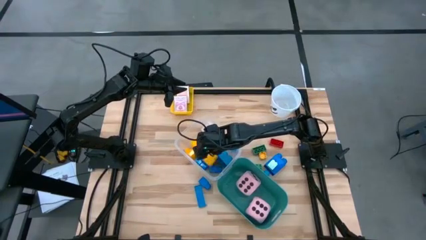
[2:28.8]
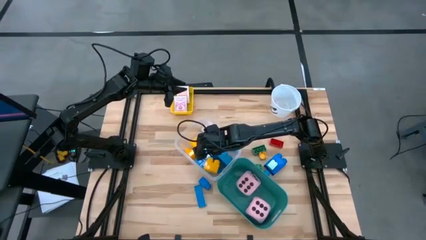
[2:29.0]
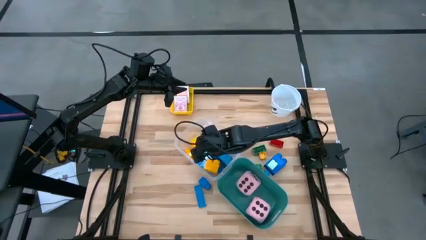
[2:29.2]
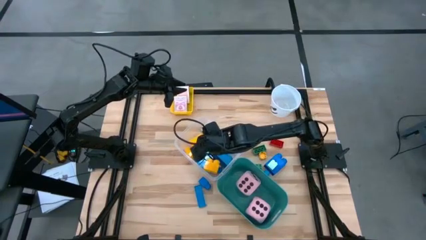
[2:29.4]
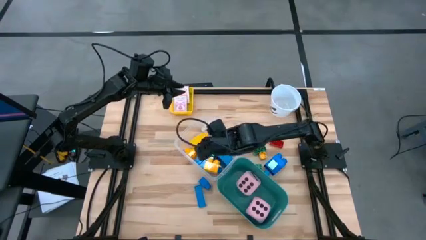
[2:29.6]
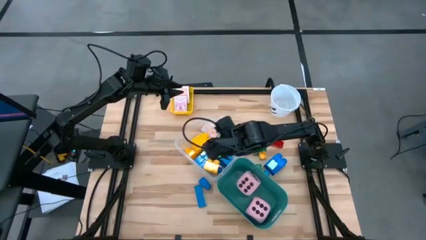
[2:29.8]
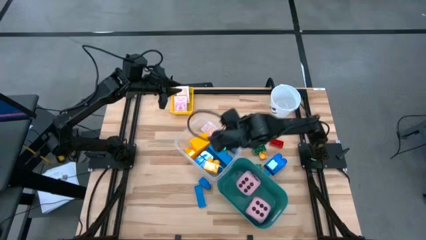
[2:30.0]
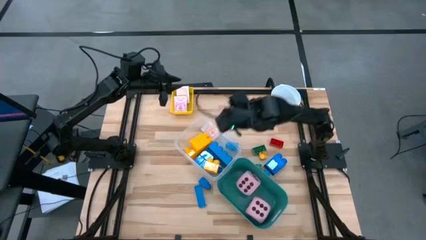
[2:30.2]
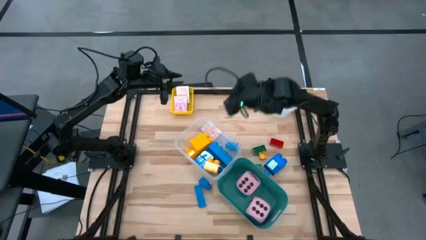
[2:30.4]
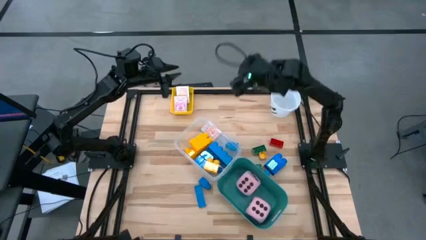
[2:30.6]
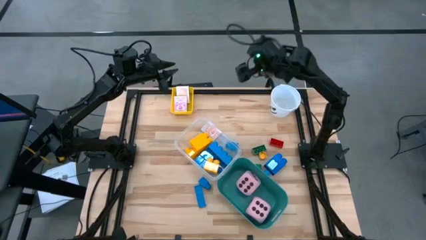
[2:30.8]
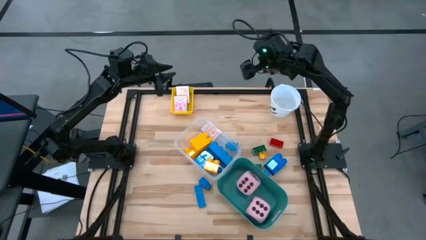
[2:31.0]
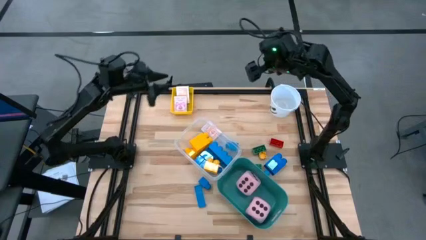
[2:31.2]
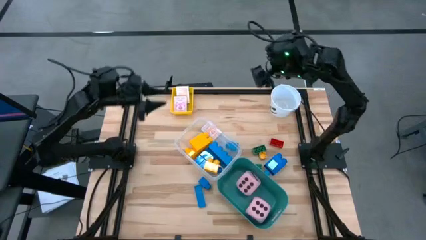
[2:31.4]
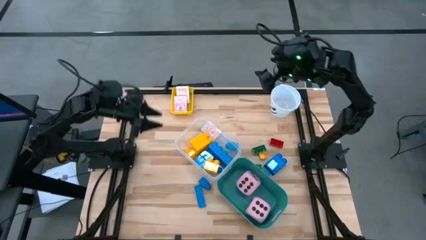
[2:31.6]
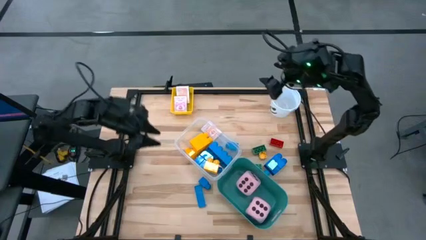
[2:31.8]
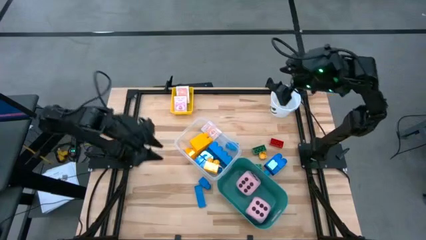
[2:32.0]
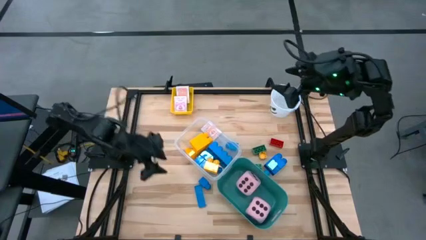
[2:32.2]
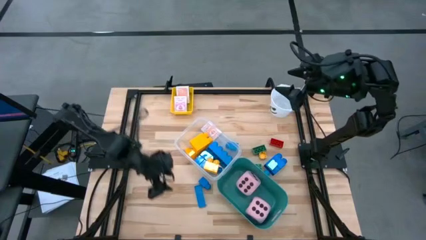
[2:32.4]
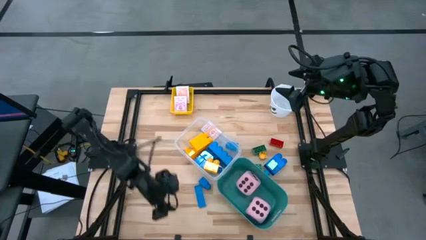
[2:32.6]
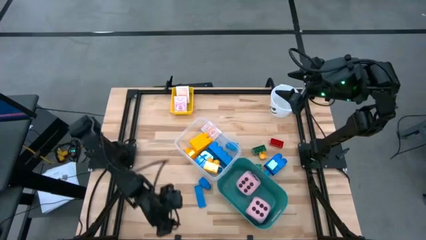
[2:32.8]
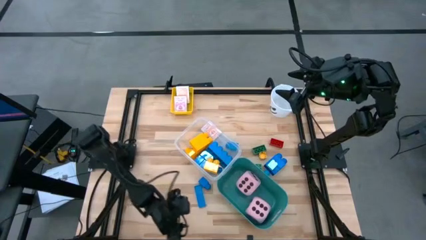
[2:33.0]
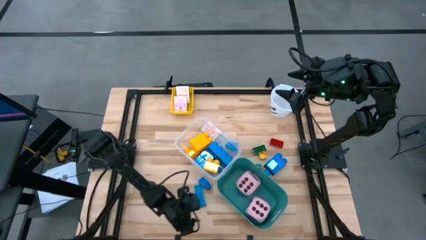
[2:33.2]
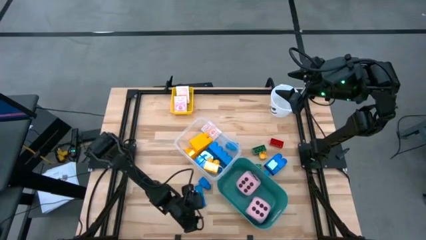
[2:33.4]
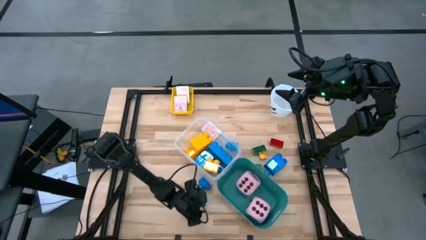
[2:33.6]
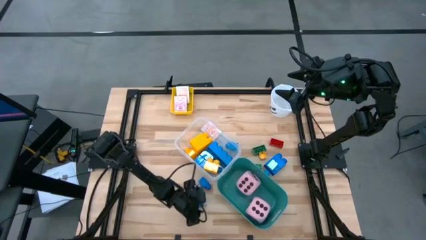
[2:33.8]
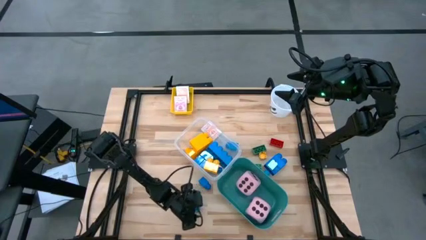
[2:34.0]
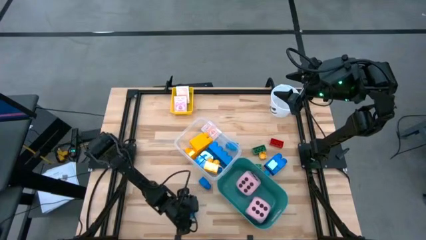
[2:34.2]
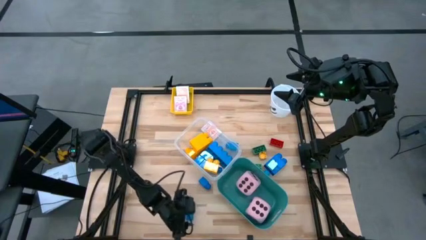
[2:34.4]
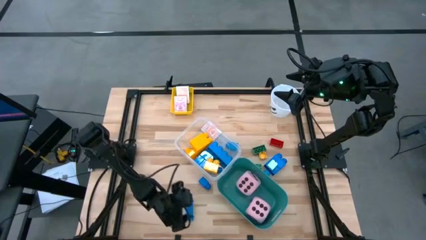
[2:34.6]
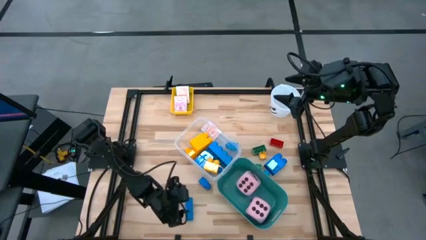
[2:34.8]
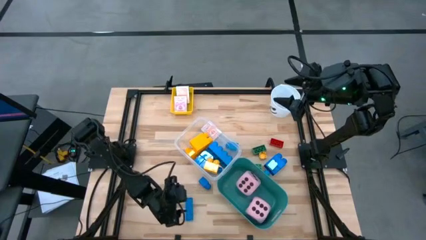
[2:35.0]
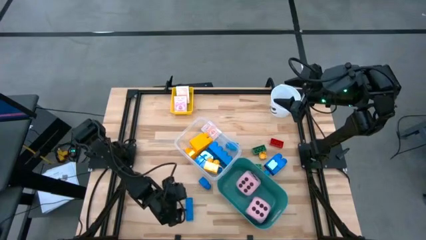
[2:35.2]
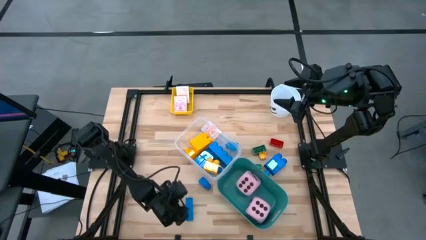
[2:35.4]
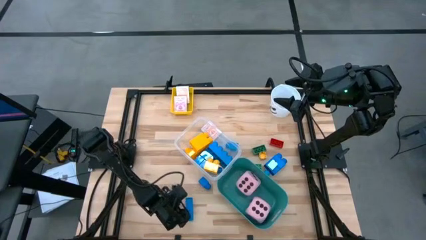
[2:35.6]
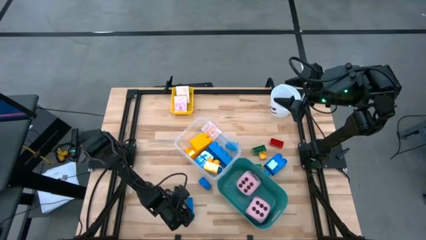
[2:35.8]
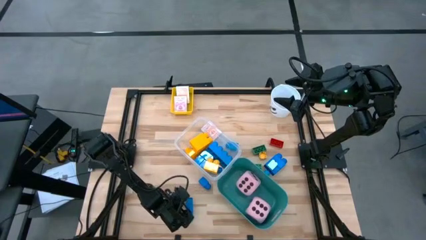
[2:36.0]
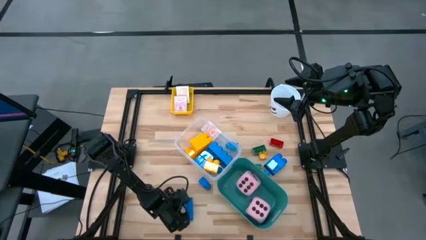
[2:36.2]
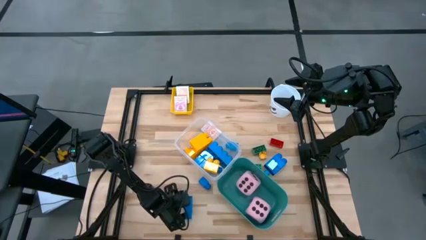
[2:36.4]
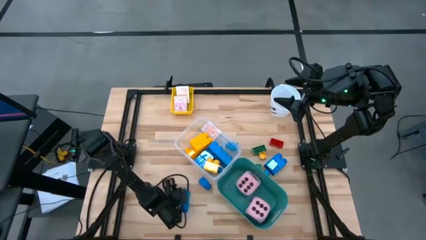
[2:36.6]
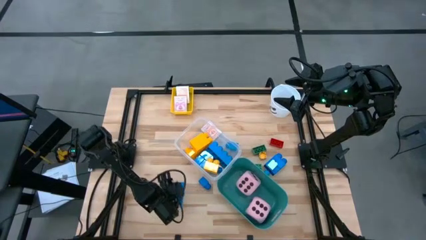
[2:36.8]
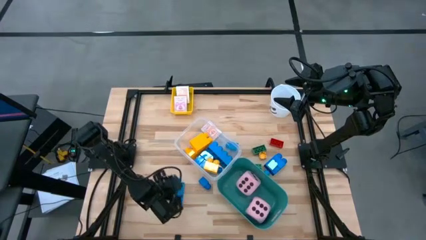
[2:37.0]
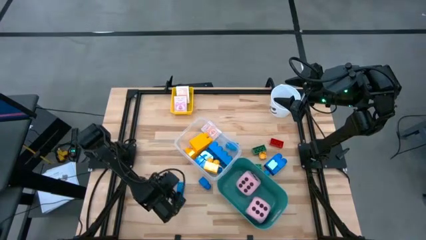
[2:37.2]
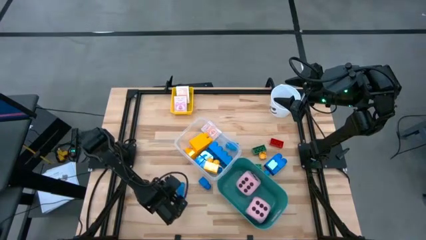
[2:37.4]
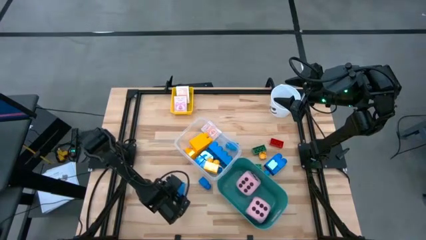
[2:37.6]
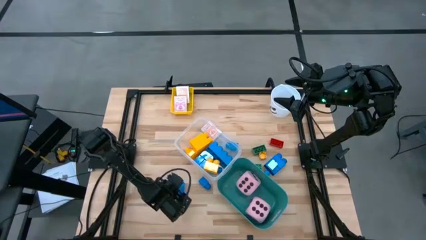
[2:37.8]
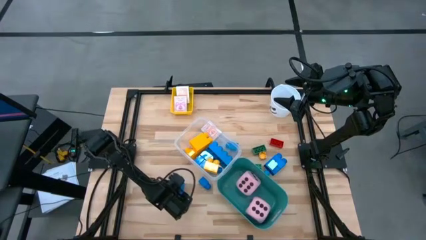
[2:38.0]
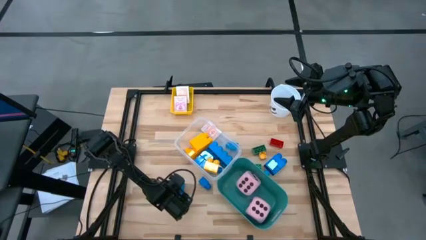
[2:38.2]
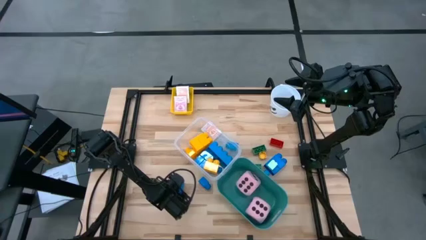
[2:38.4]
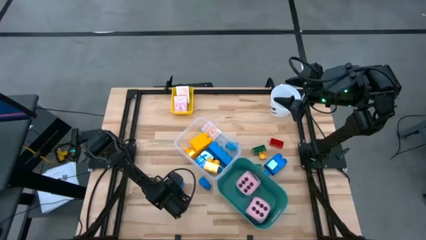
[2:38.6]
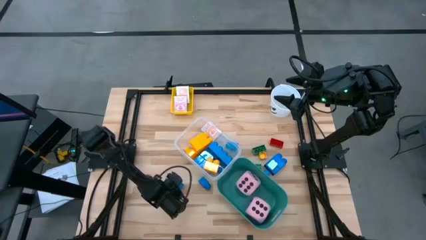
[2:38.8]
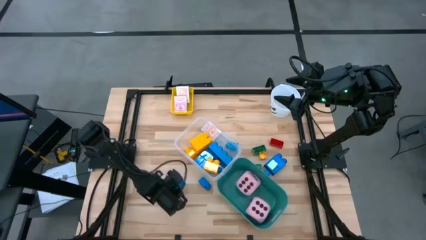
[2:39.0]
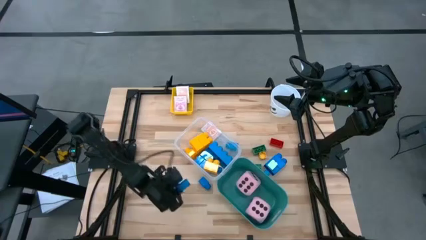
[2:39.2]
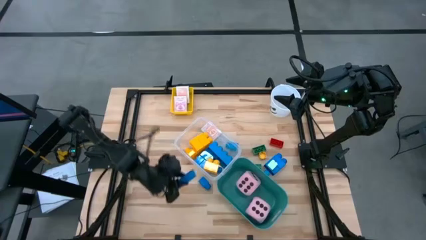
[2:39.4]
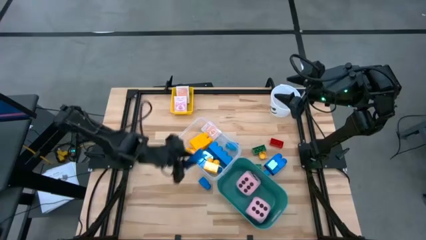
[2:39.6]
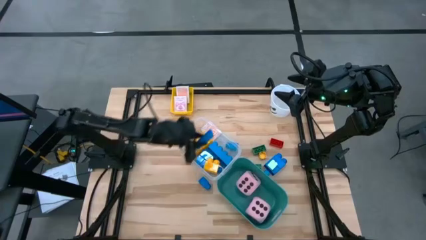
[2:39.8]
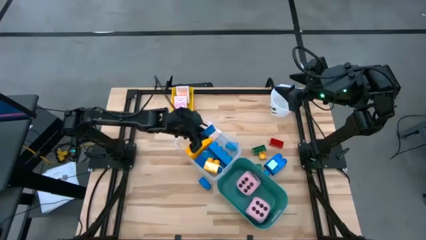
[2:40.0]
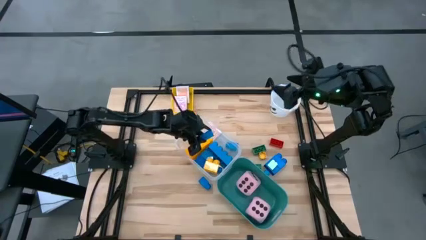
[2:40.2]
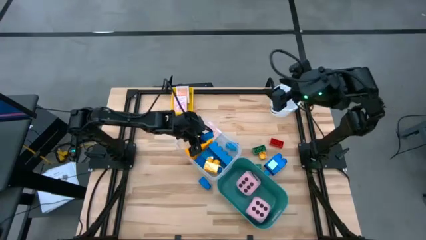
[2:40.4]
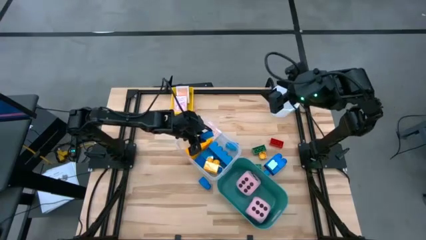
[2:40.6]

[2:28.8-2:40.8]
Task: Pick & Place Toys
Put the blue game piece into the transparent bin

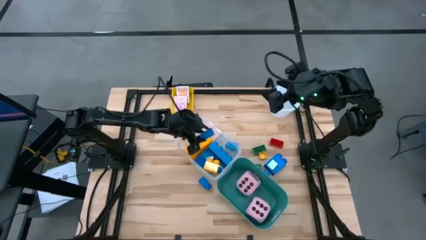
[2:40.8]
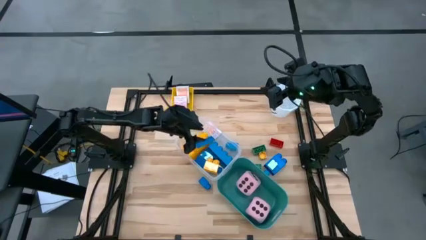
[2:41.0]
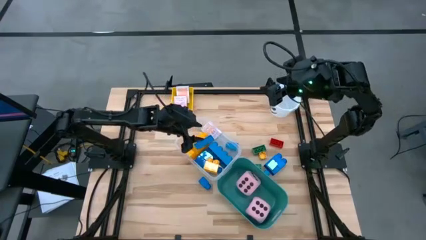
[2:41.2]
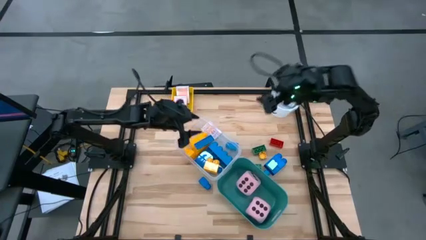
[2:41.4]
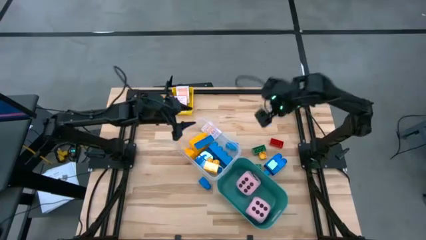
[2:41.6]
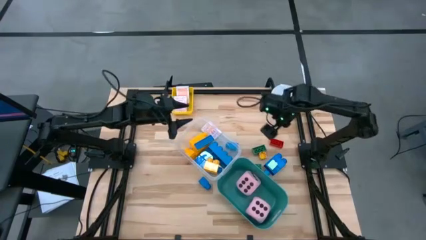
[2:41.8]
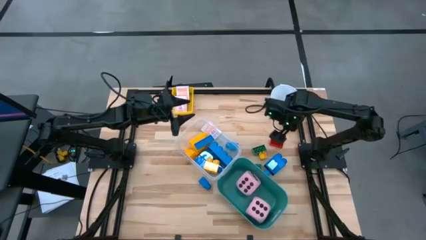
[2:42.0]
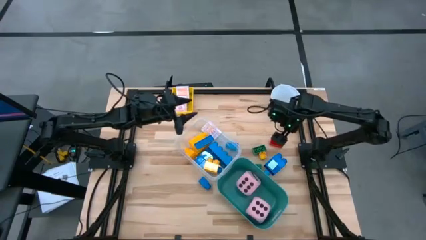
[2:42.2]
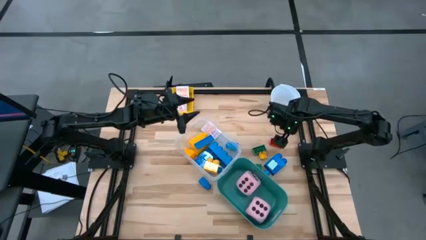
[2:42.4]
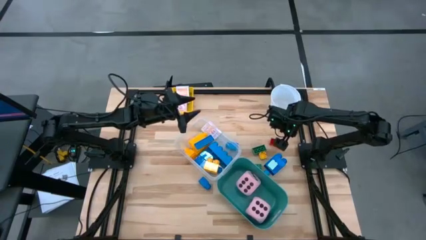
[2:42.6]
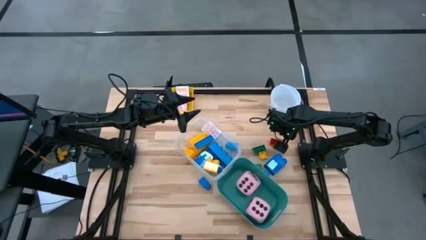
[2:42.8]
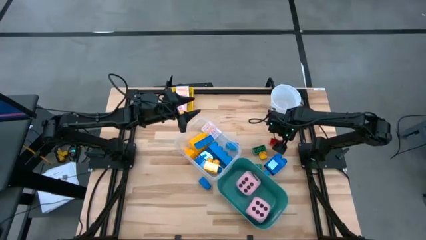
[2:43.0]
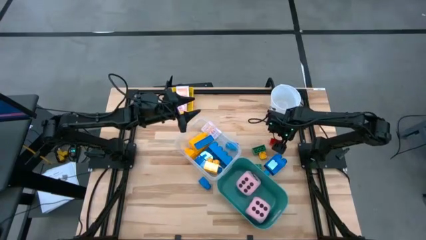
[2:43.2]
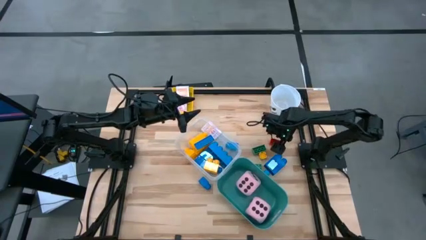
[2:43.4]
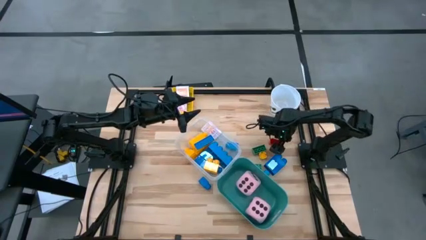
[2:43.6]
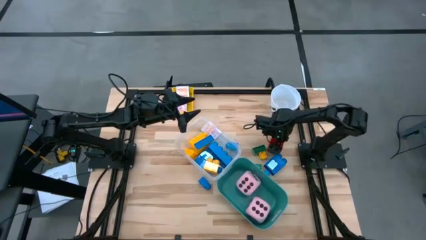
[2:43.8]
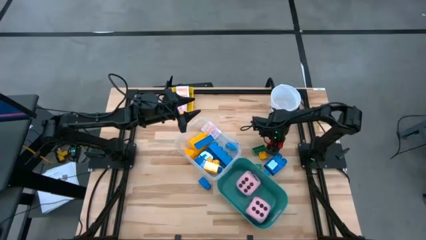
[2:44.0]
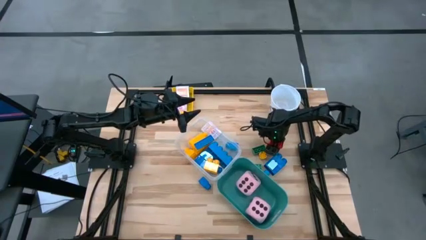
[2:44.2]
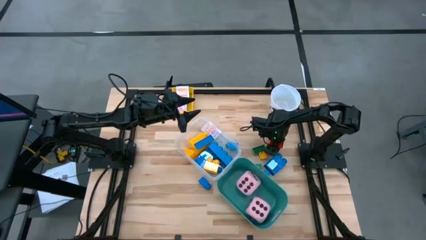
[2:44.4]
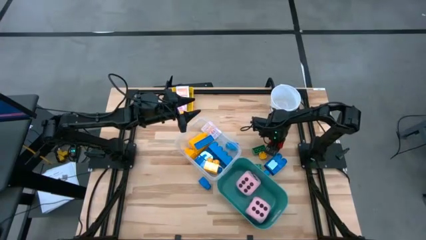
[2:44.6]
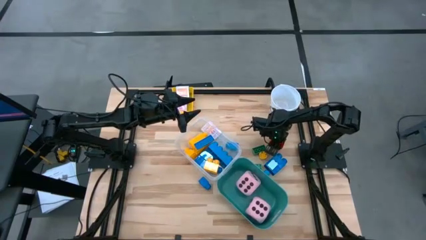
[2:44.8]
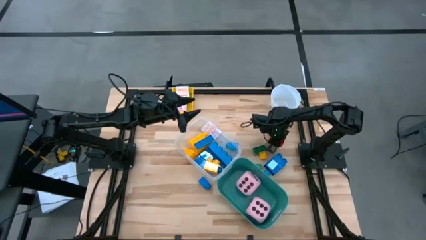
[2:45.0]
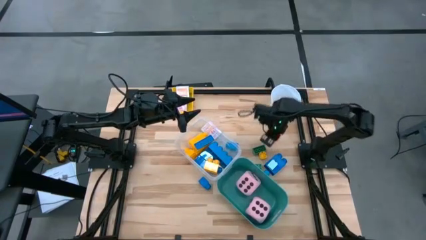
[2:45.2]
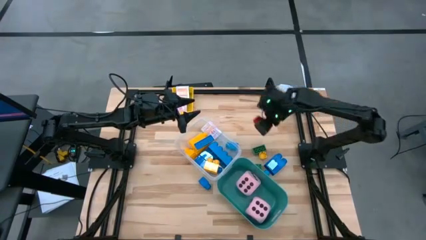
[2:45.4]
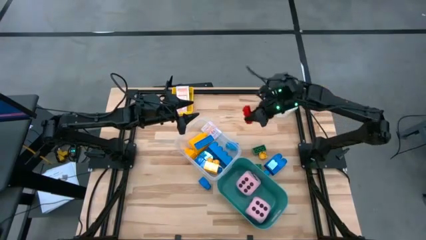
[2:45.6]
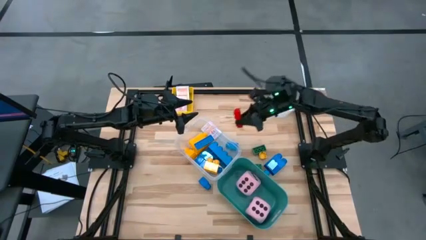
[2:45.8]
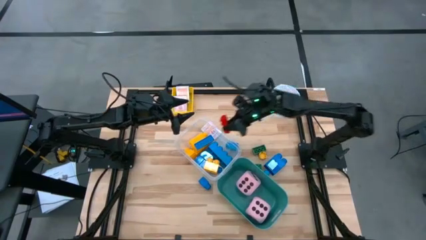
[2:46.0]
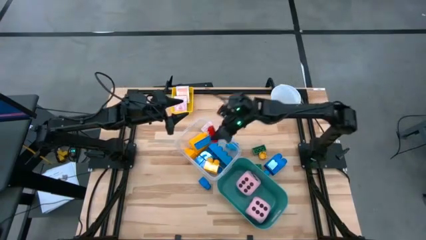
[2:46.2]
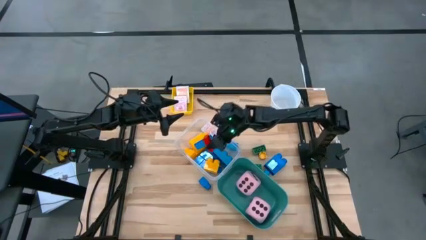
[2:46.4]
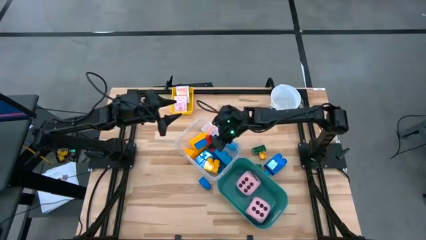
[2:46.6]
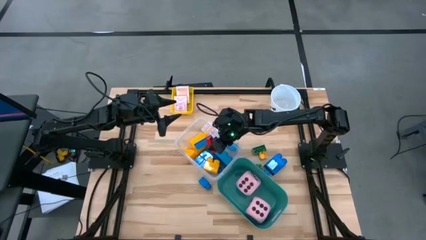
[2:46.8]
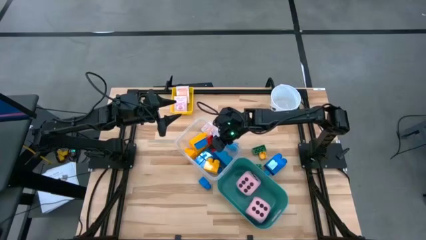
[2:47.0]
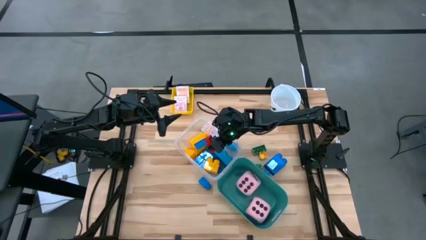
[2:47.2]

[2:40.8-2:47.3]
Put the red game piece into the transparent bin
